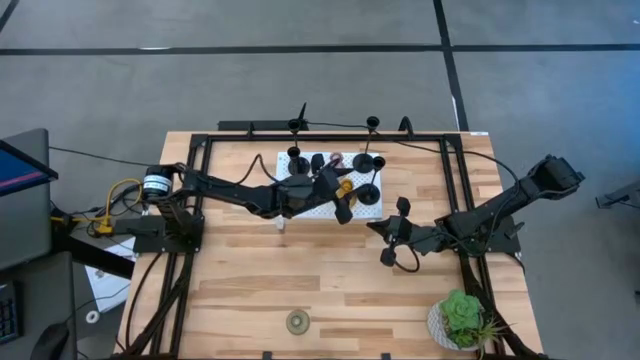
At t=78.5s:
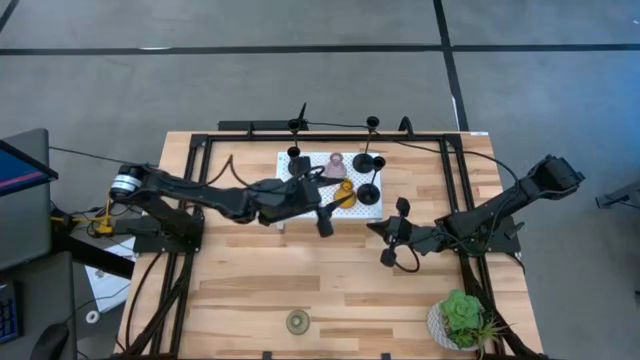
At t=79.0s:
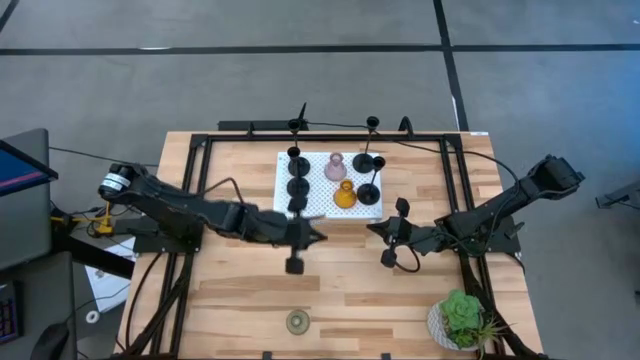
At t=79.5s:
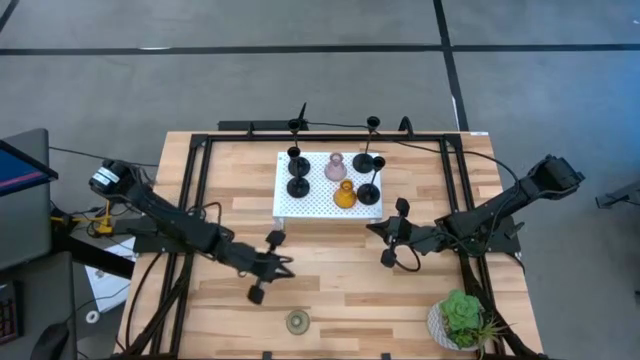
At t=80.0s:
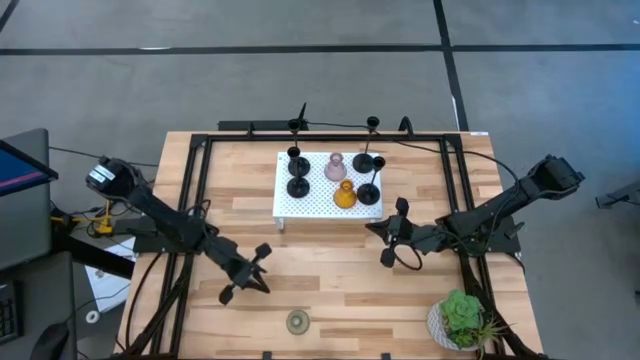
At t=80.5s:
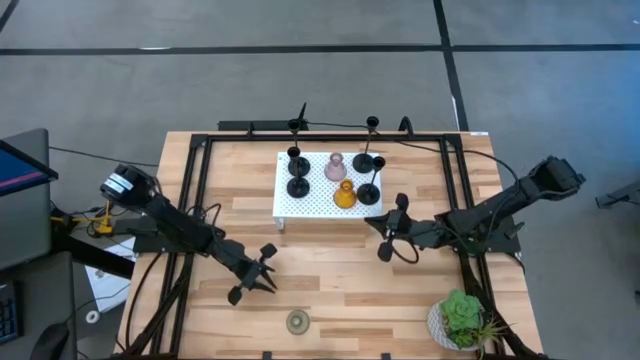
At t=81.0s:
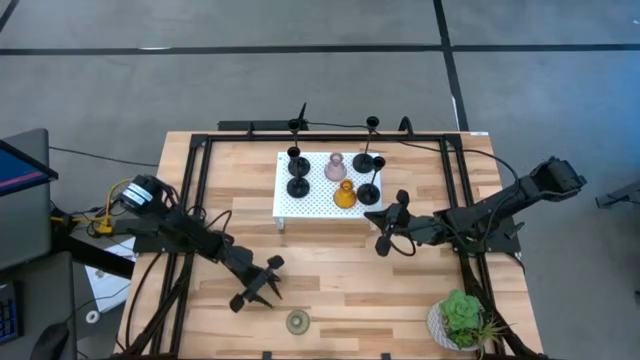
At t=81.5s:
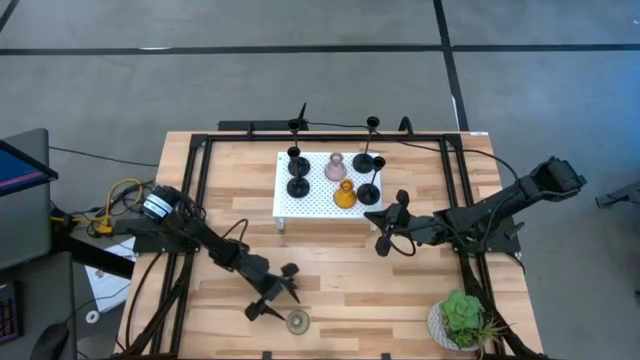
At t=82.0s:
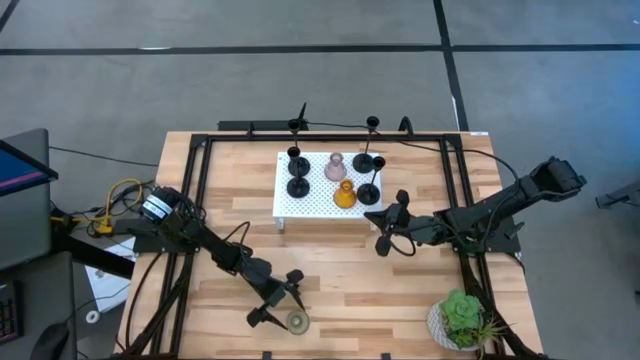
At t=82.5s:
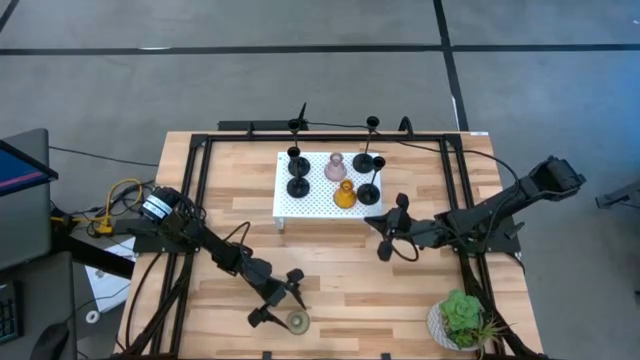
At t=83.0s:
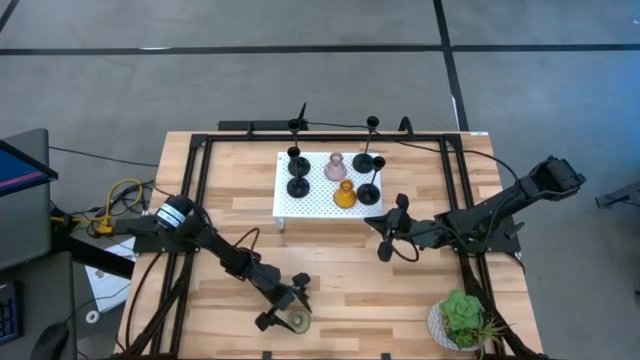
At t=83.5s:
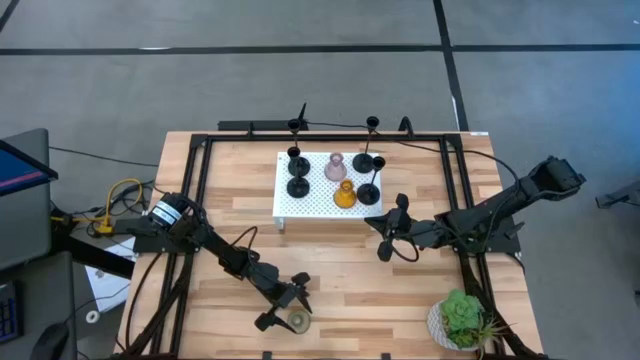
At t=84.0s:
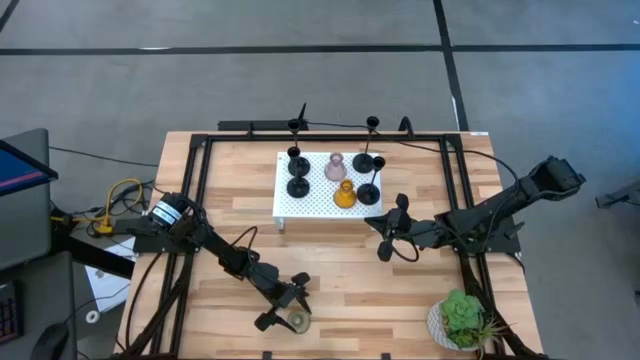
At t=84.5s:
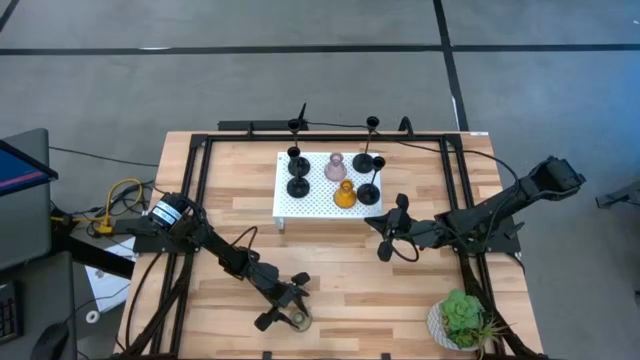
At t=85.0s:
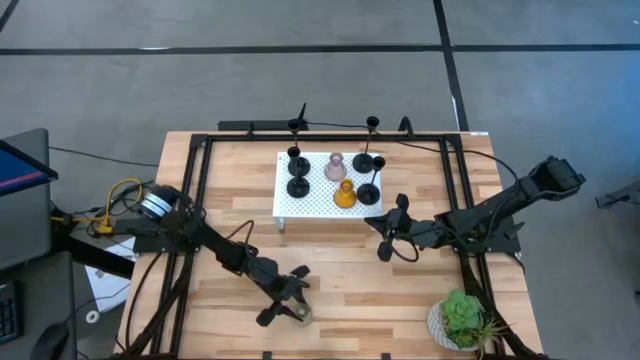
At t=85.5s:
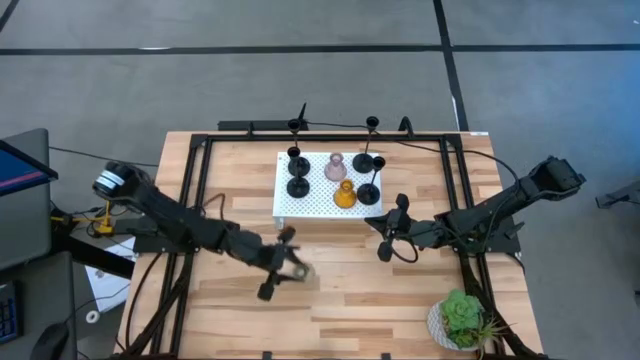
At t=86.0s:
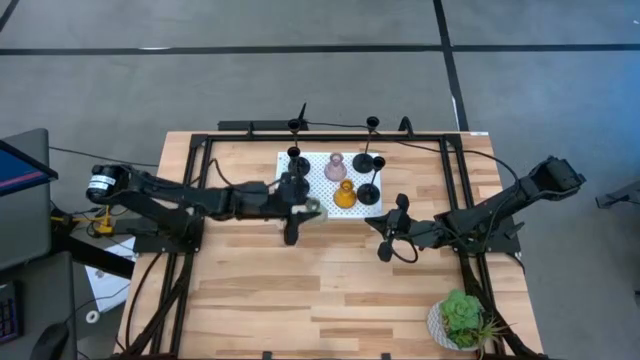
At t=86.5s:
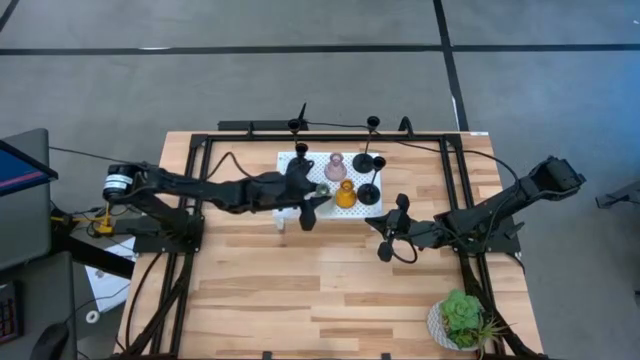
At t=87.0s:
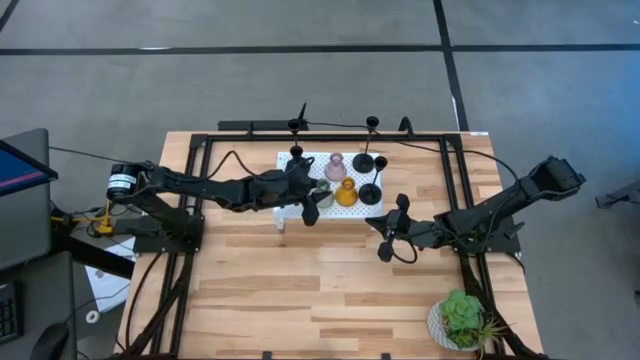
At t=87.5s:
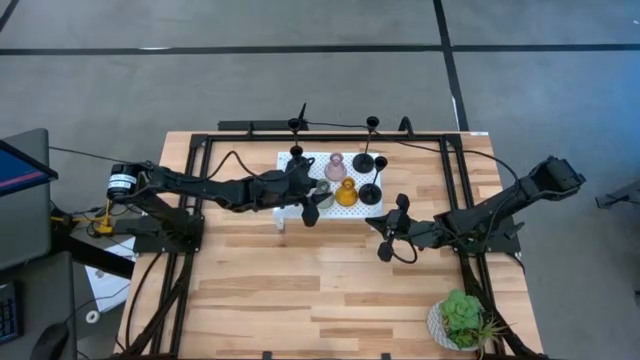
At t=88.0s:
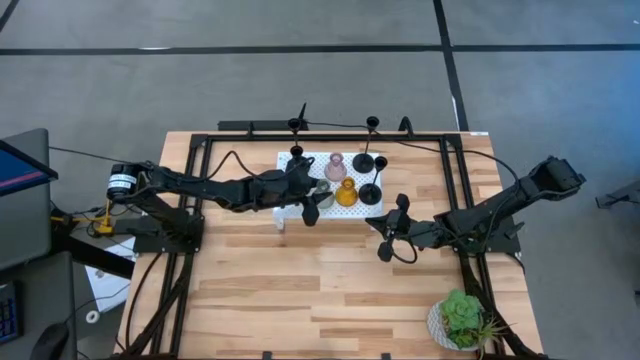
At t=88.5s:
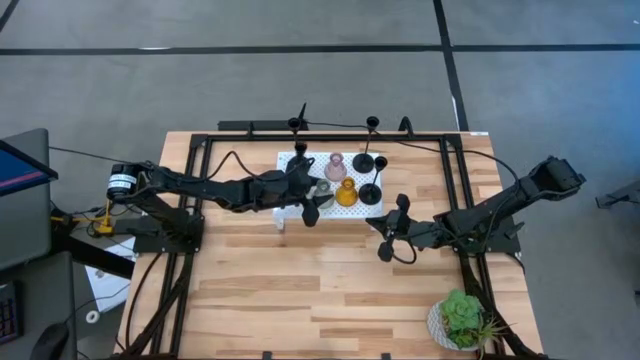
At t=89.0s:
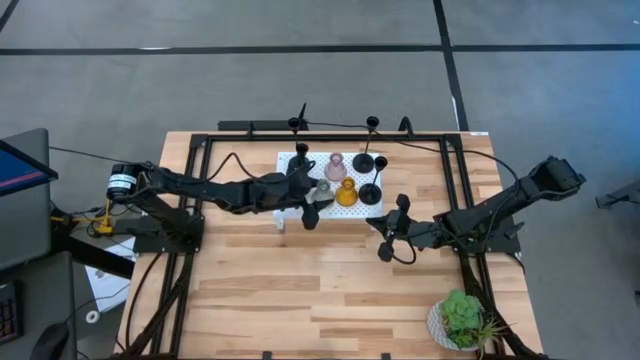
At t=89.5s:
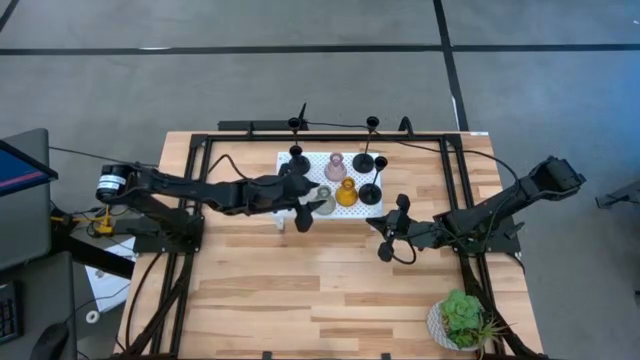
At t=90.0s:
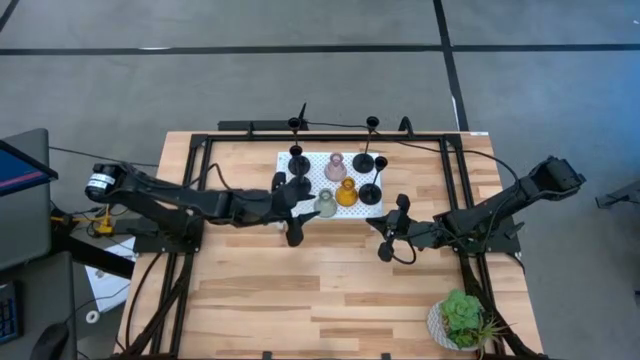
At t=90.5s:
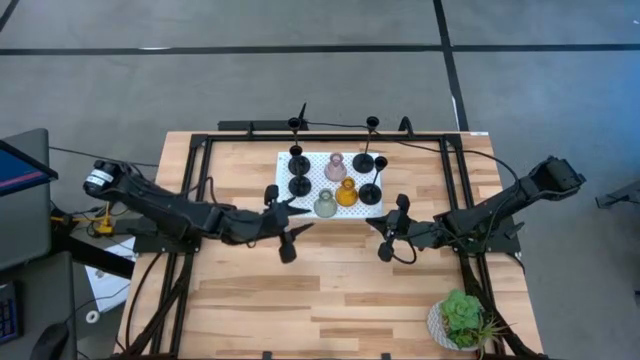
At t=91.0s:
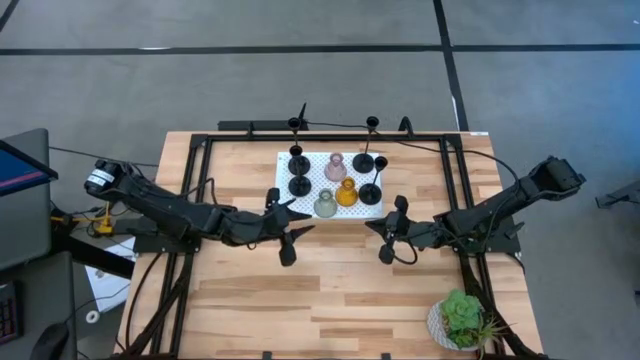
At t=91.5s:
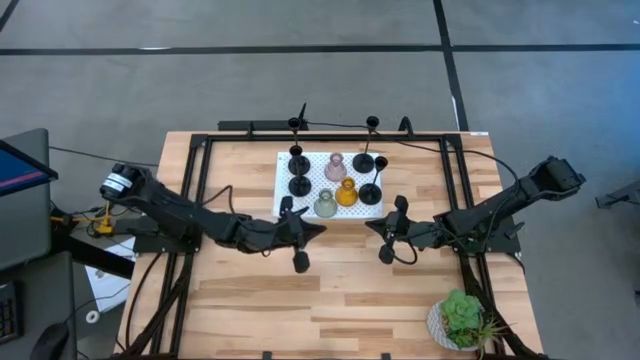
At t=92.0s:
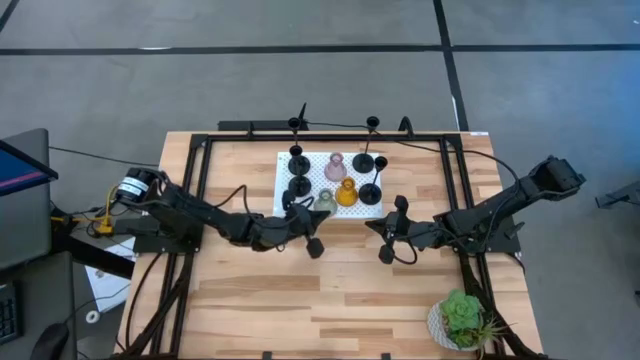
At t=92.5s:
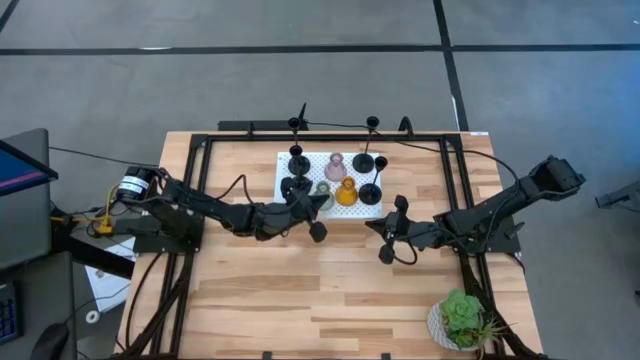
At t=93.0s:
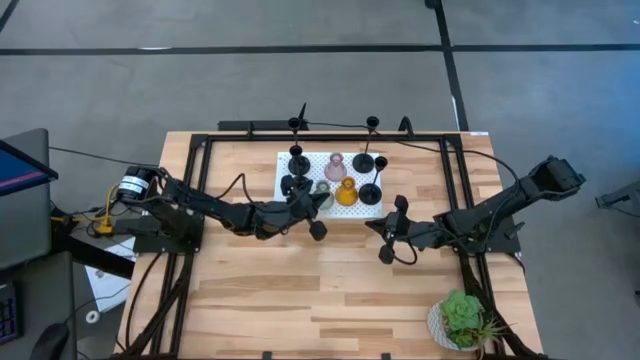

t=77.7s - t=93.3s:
Task: Pick & Place candle stick holders
Put the green candle holder on the shelf

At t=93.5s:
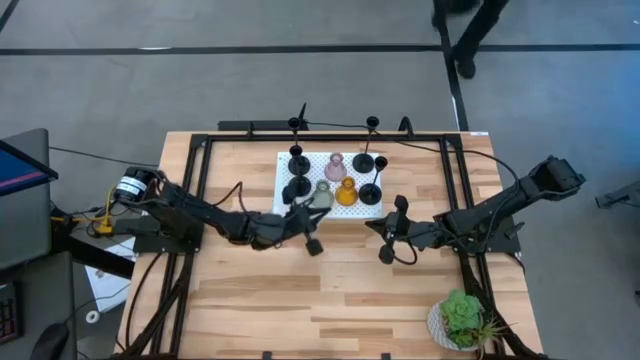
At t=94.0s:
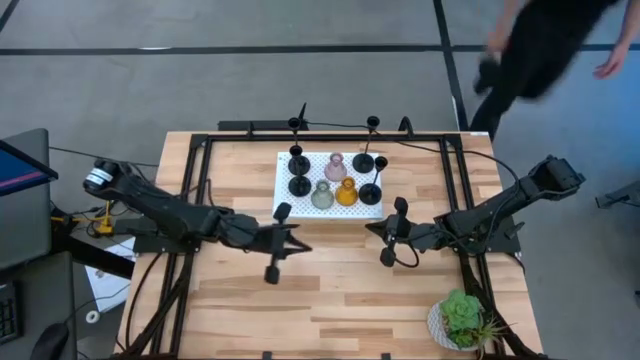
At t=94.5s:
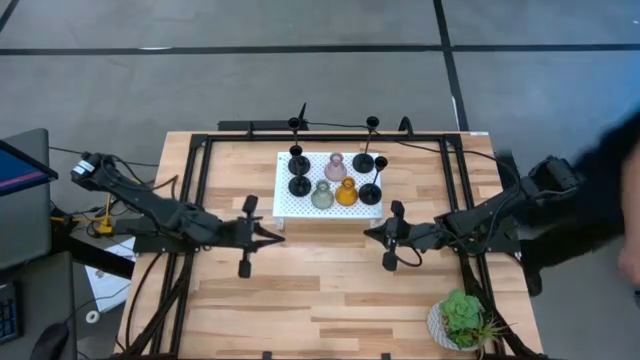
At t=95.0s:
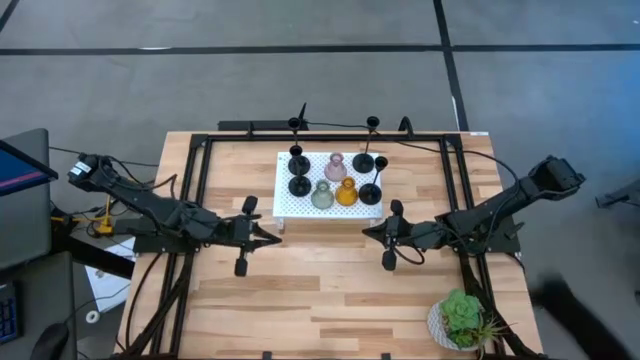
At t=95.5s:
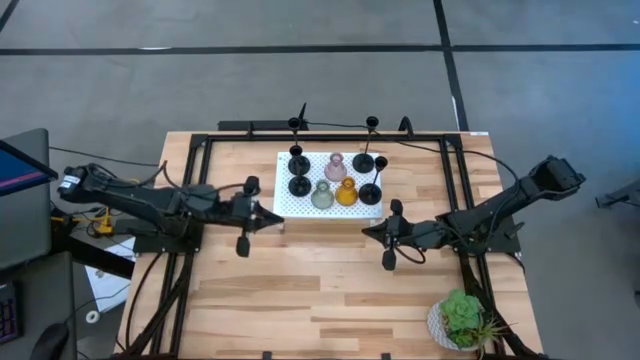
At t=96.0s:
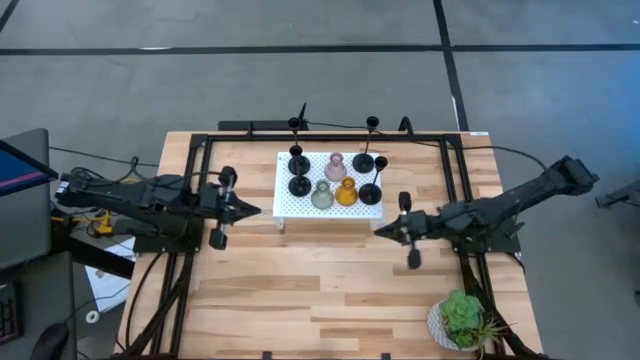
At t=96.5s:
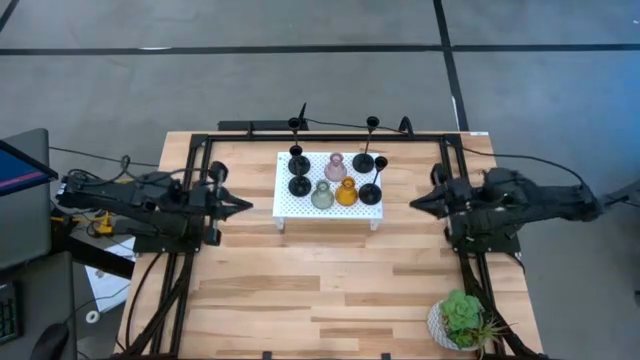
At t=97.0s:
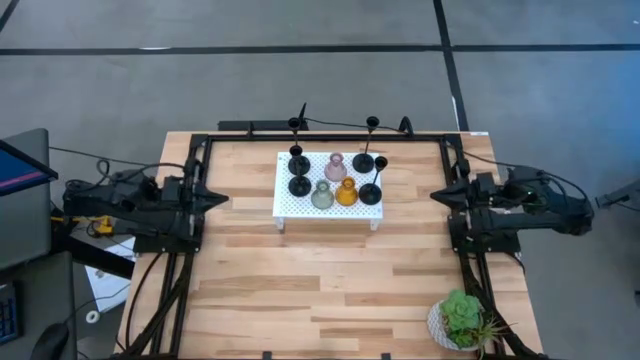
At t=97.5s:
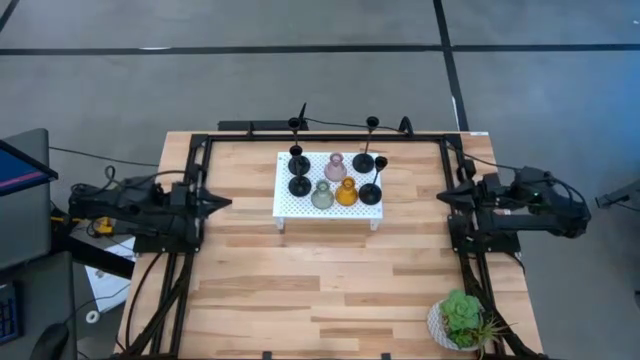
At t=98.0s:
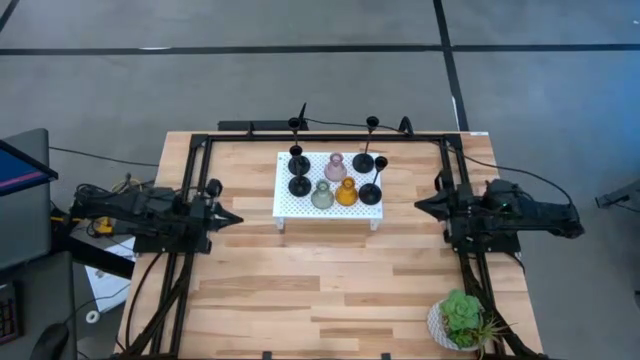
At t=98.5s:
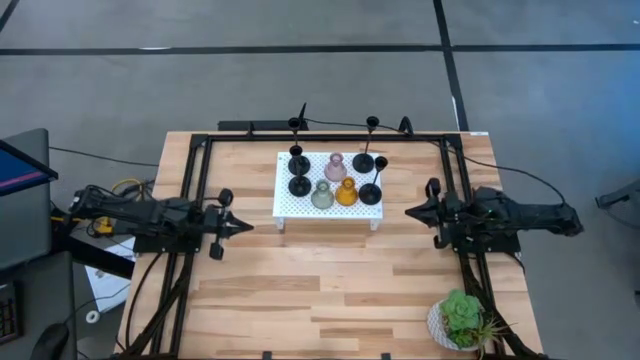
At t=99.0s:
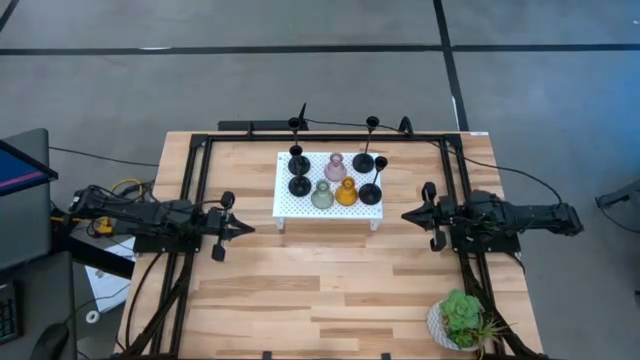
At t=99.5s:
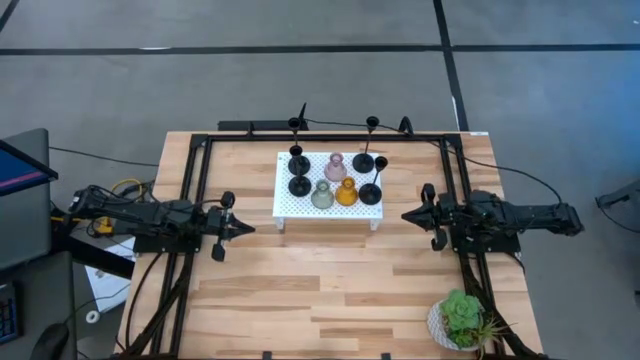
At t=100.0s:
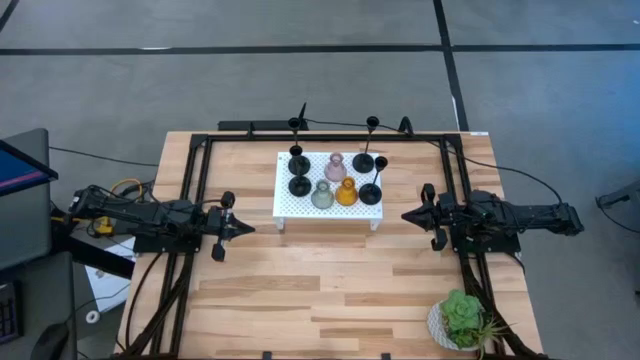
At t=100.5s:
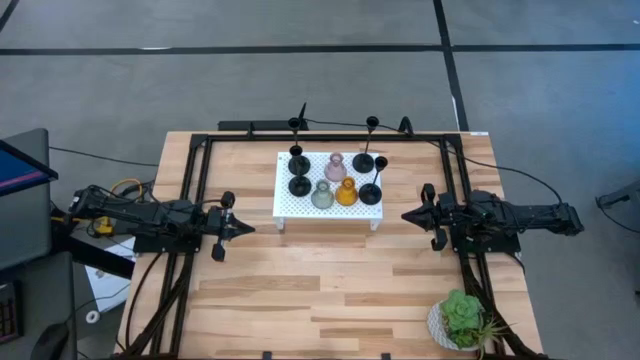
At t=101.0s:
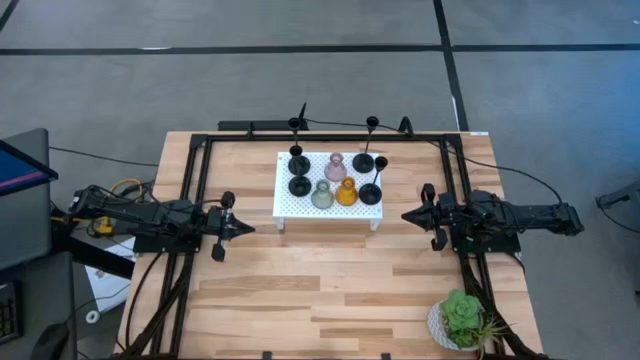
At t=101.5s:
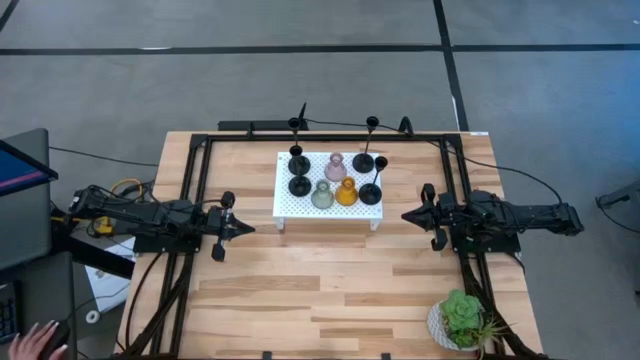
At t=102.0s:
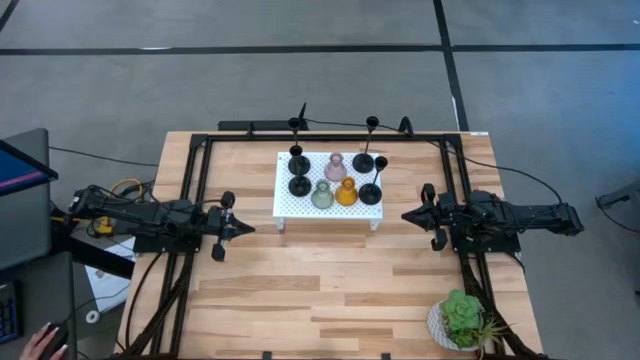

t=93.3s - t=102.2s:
Return to Home Position
